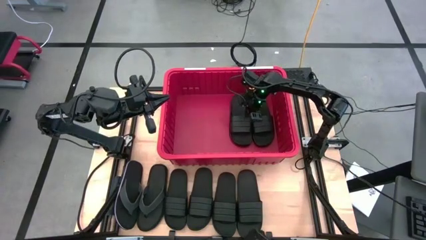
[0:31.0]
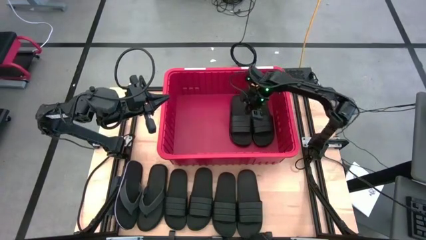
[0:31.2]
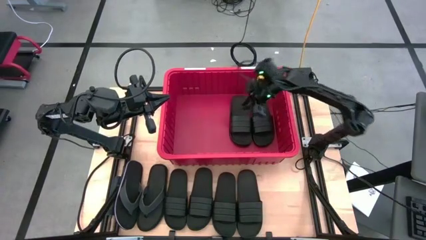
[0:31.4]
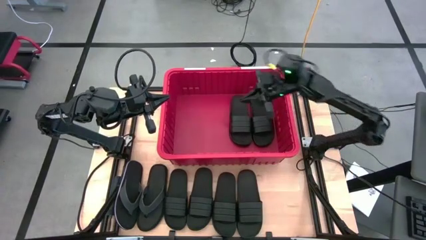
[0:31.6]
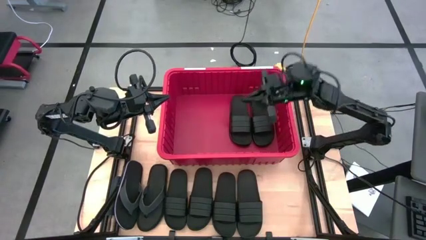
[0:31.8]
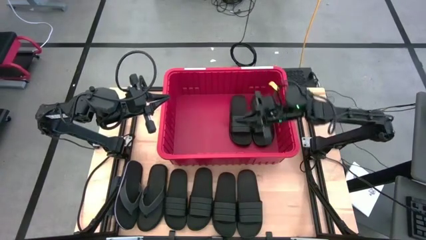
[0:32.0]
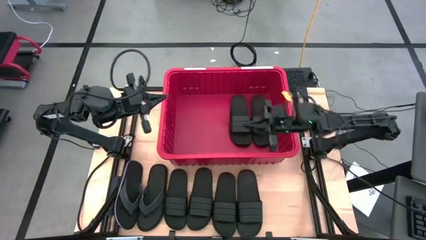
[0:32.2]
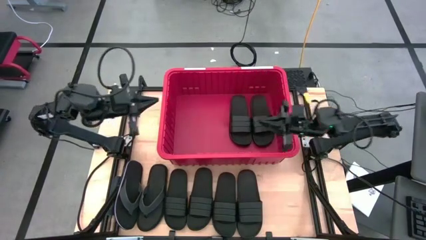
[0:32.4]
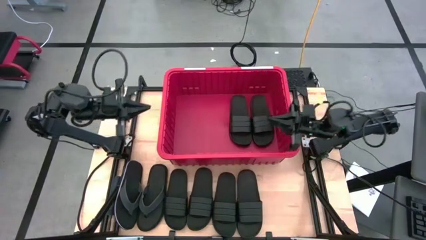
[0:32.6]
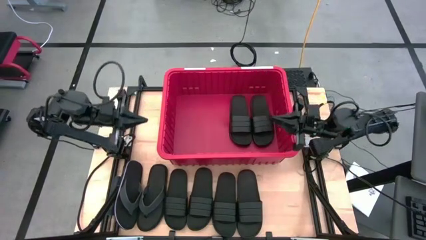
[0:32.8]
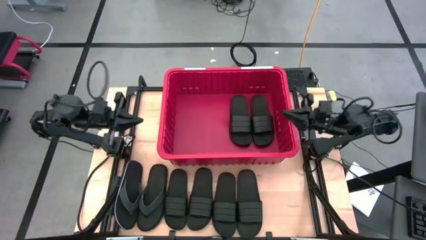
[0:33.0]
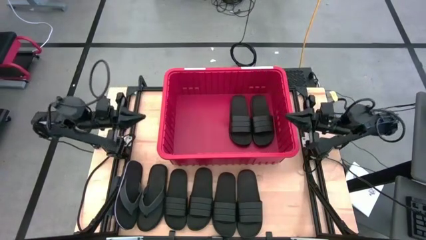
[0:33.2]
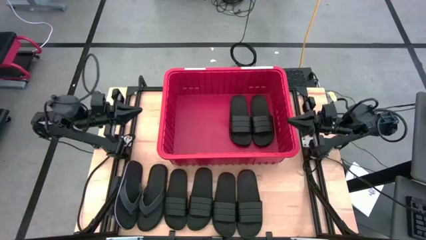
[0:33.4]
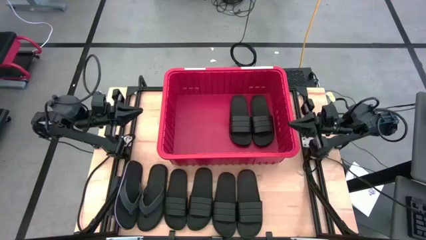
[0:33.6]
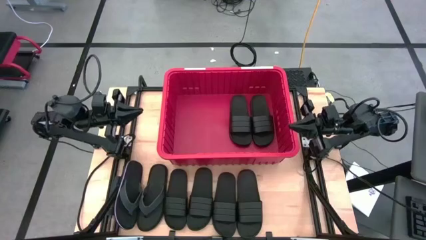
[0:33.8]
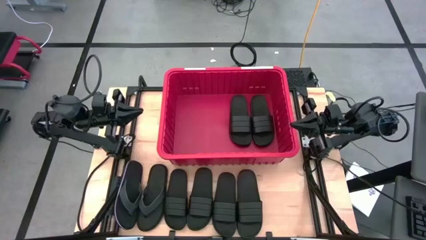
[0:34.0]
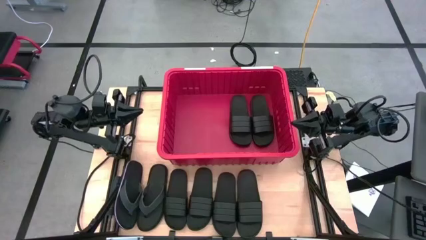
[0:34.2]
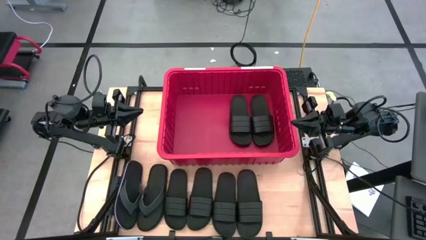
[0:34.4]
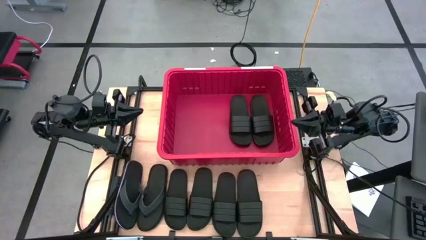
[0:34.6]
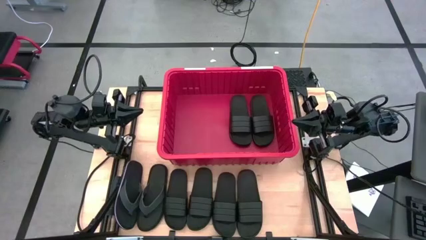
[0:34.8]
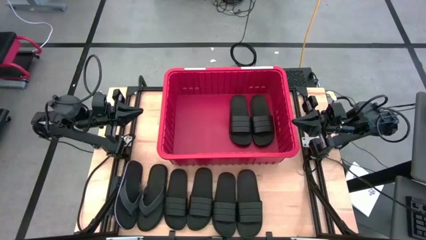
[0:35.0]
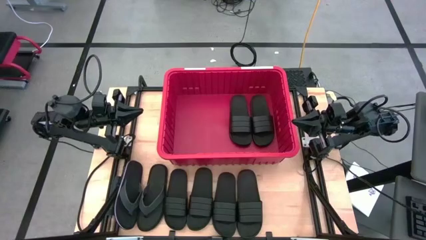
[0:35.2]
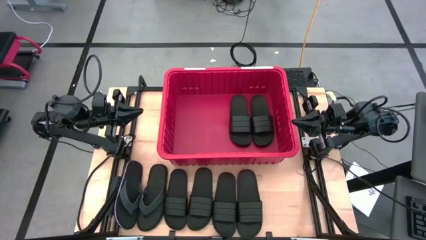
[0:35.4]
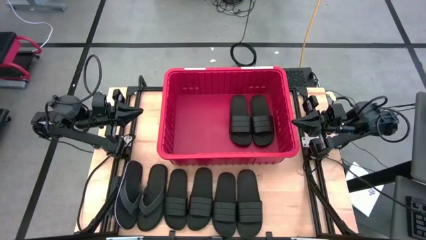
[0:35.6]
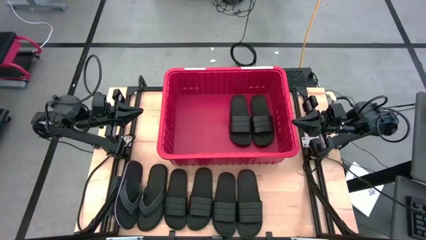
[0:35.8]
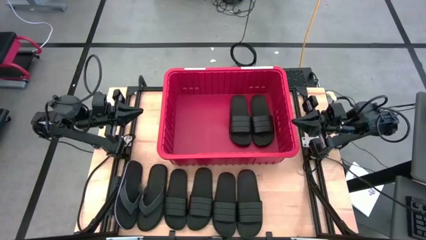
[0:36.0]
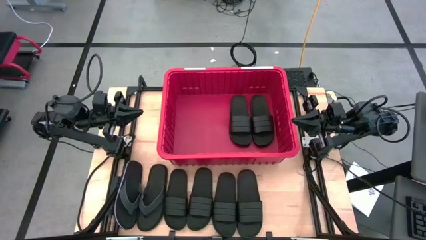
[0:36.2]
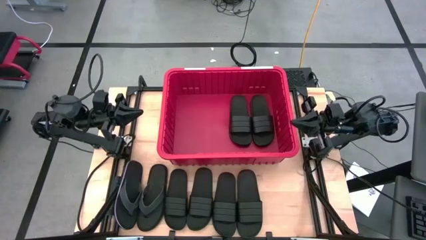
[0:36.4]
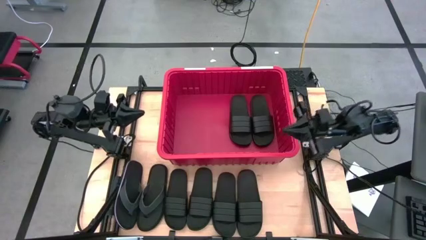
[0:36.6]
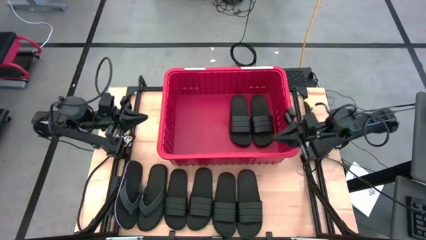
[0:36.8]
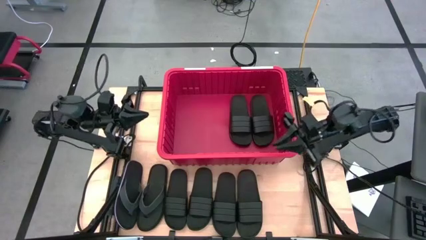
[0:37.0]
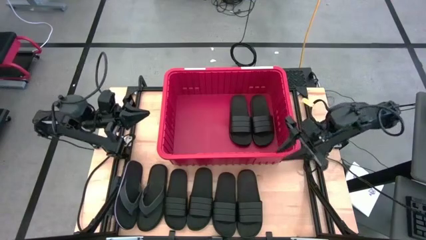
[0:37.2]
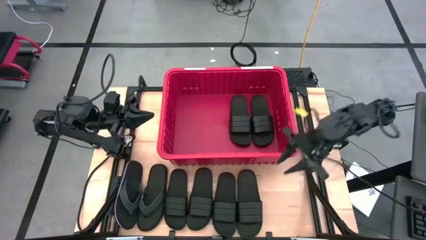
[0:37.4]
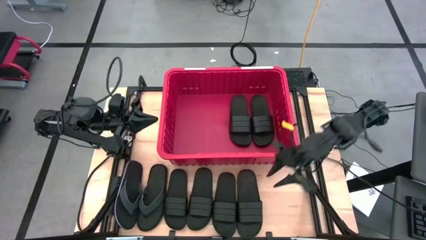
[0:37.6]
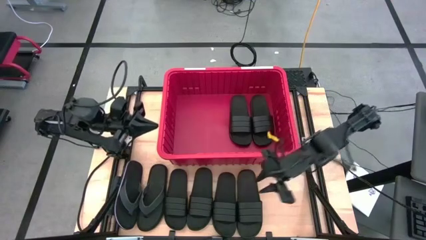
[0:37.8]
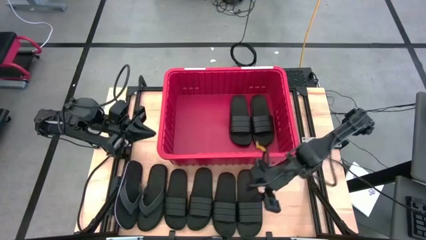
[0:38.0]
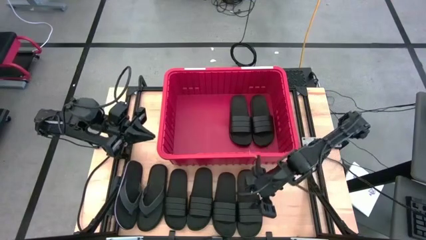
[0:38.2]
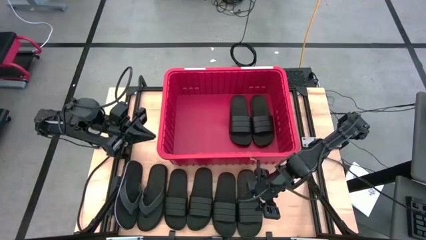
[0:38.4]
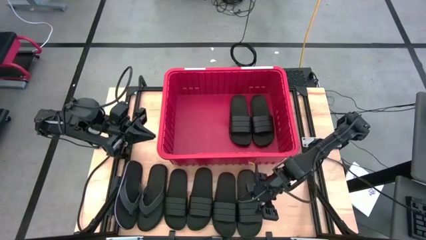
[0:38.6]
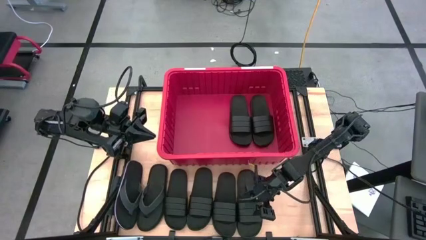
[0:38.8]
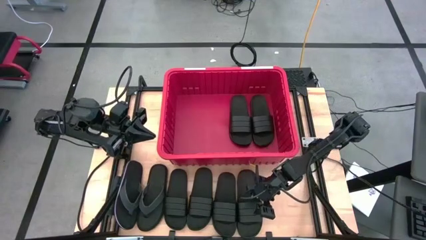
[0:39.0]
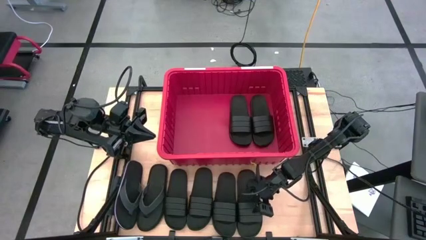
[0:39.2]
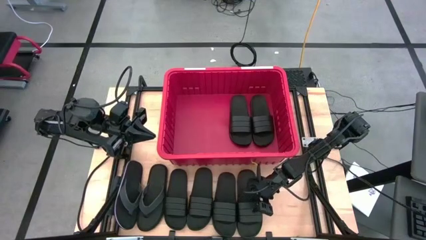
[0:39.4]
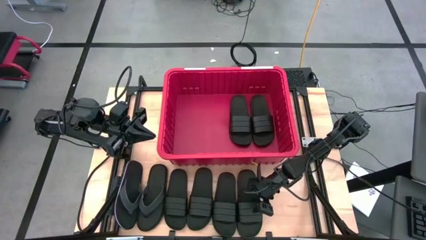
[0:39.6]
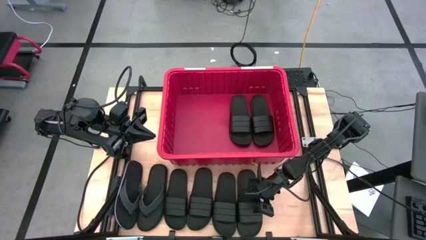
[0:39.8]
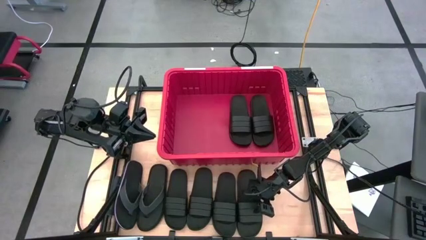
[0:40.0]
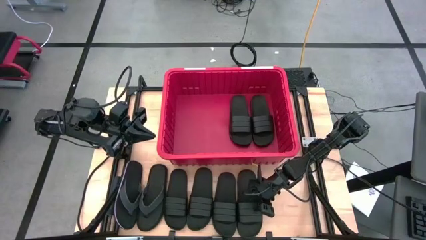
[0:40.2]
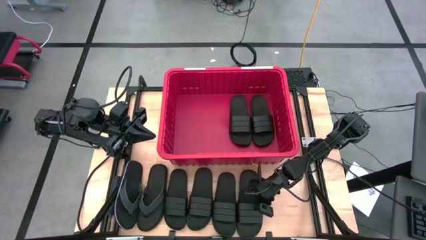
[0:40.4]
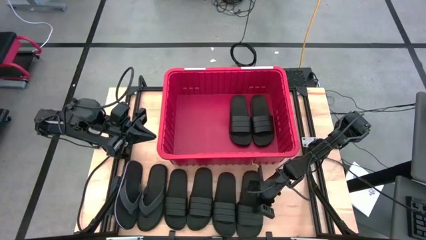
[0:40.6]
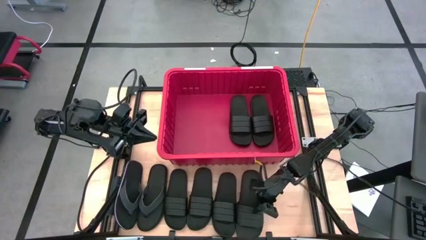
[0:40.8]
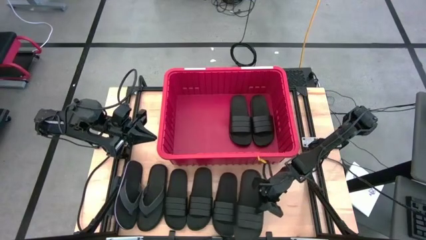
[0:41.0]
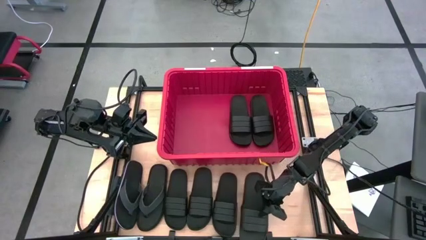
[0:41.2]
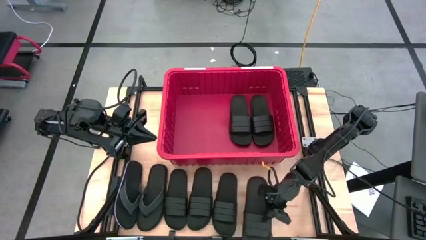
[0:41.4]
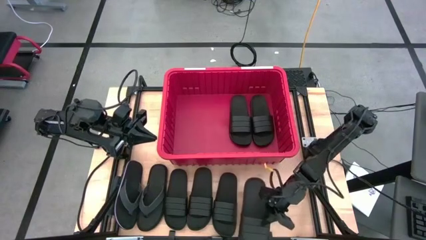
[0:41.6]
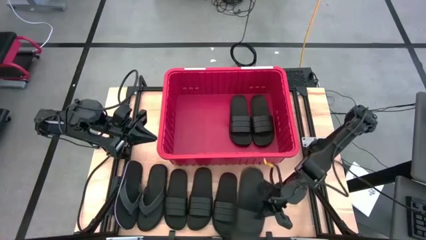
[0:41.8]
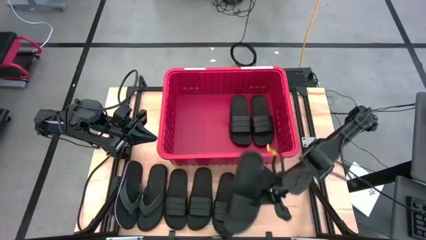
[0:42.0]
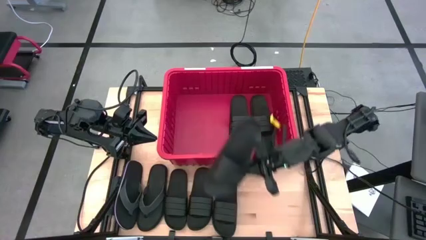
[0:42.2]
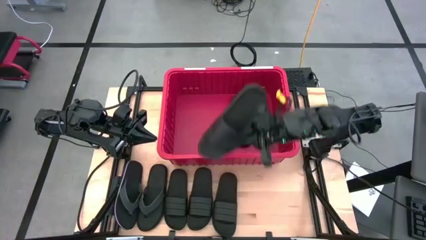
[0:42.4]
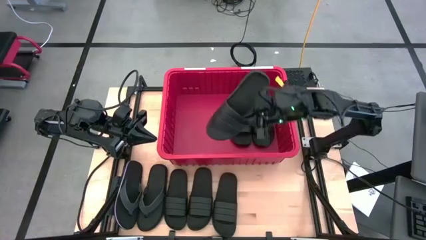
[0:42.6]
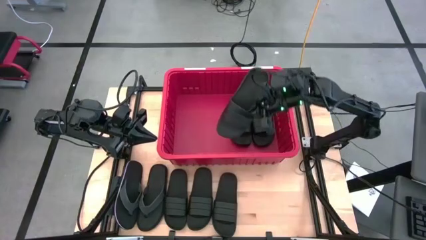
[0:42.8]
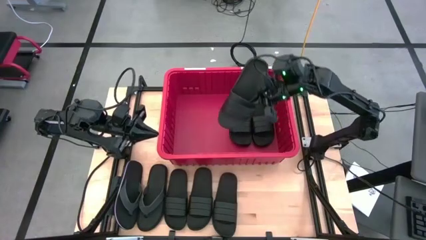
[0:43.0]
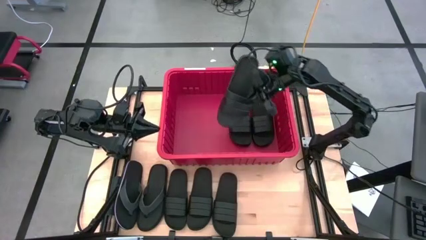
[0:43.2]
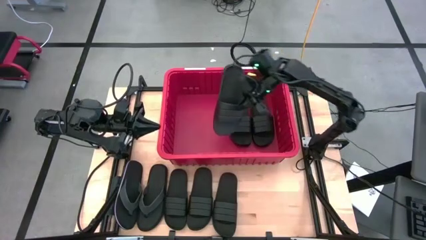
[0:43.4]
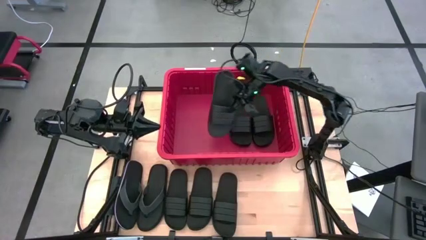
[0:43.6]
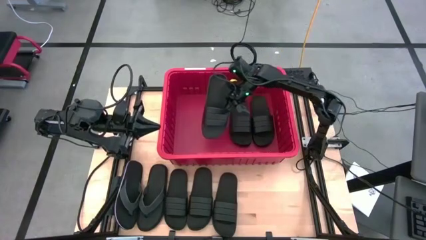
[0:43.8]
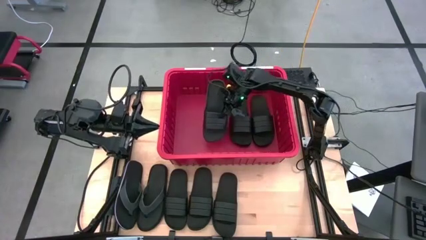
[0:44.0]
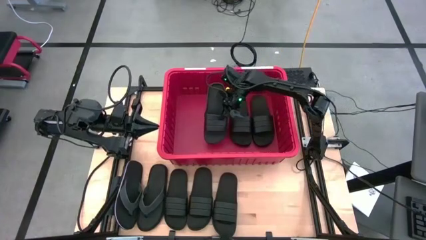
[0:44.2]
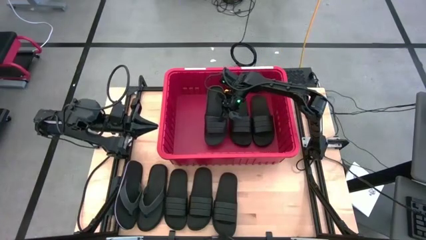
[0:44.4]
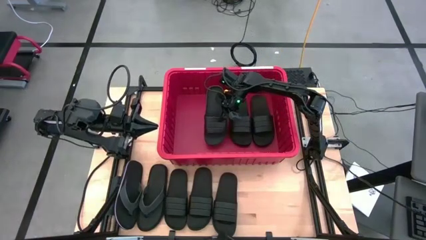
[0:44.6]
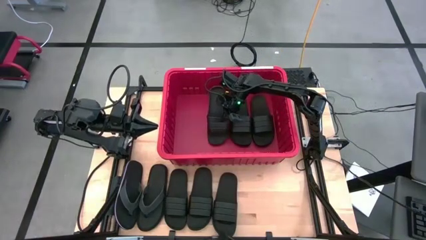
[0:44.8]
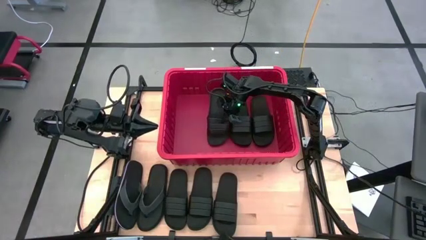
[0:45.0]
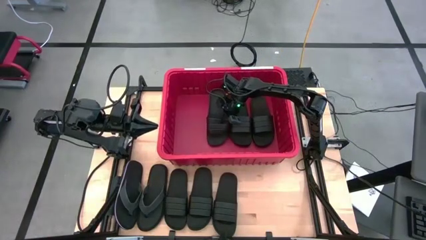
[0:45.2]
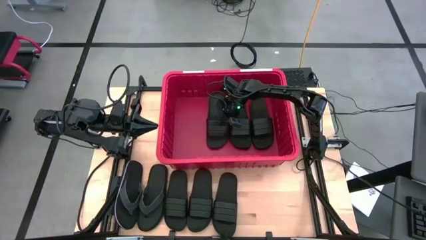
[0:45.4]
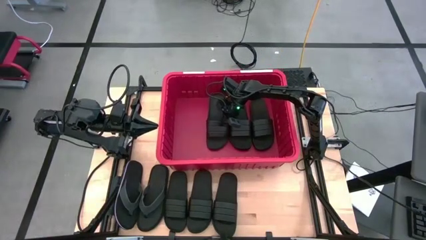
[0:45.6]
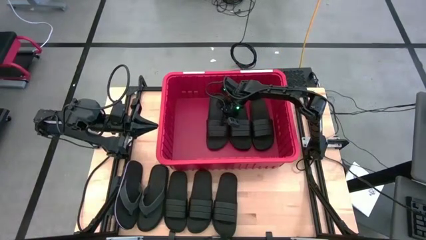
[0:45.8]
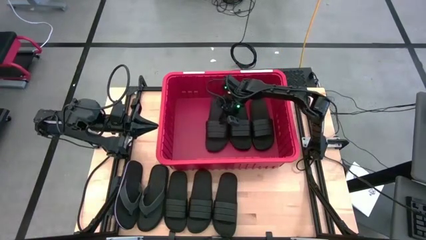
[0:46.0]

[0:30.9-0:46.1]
Task: Pick and place slides into bin
Put the black slide into the red bin

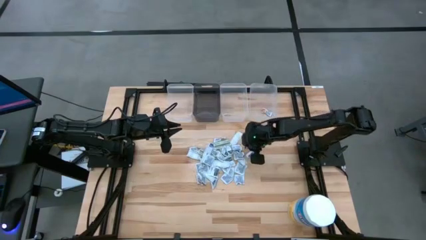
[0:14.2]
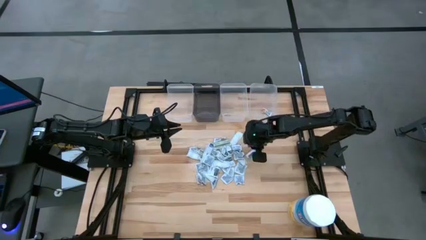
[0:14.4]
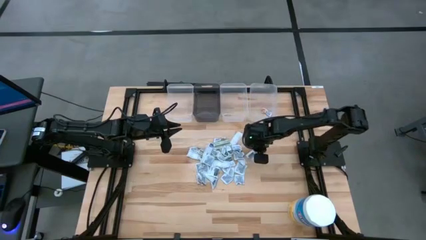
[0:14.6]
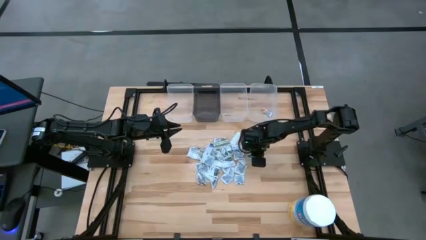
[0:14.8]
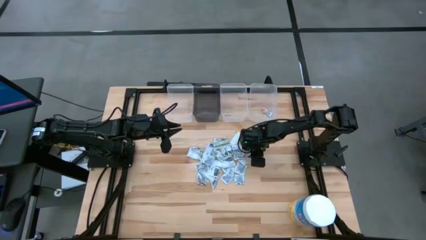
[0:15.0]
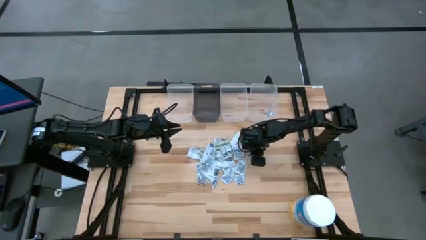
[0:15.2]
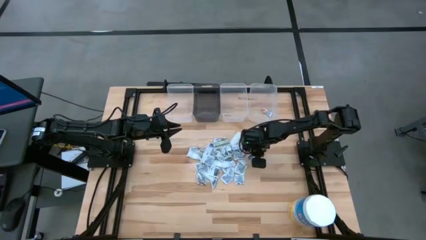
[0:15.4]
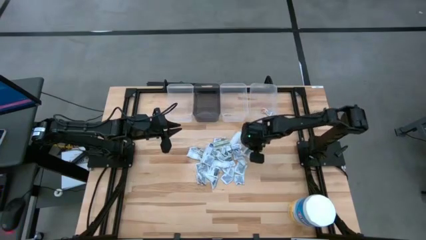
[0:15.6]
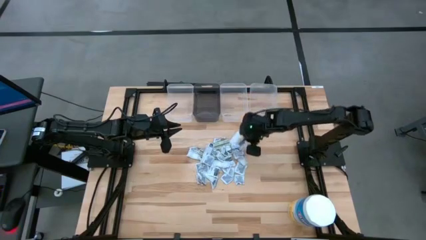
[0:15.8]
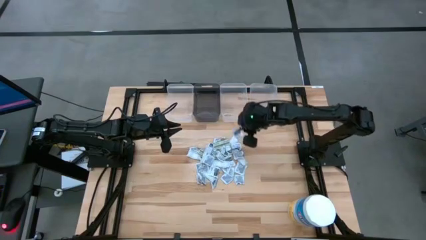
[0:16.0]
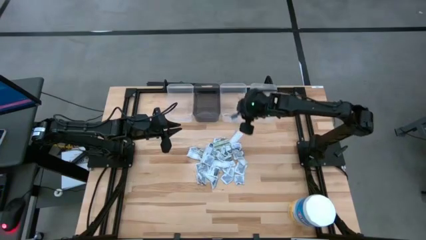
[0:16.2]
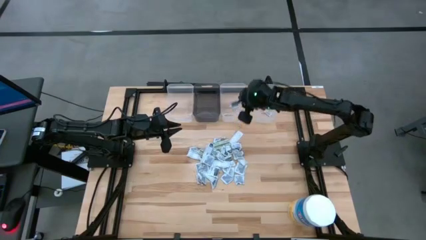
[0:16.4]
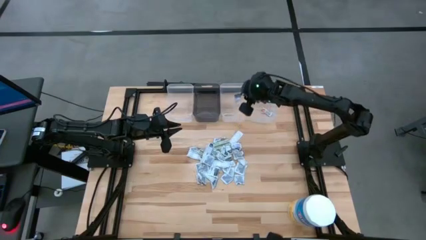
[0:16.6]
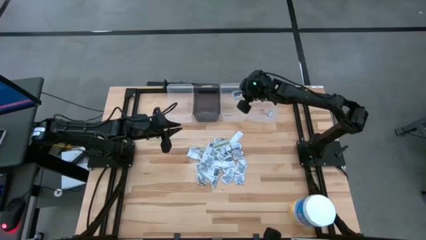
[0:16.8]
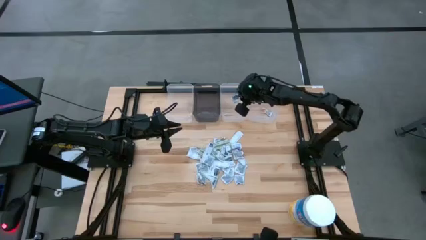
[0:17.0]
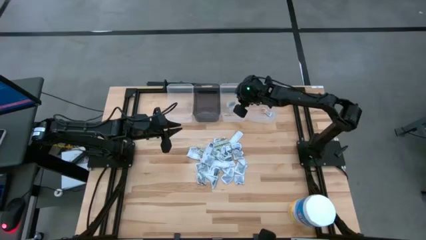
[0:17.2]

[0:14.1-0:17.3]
Task: Pick & Place First Aid Supplies
Put the towelette pack into the middle transparent bin
